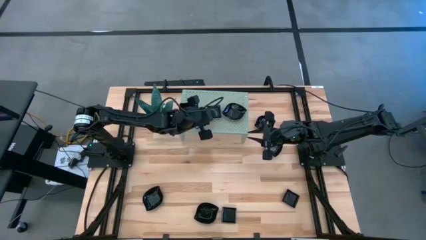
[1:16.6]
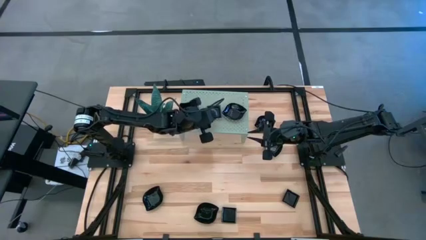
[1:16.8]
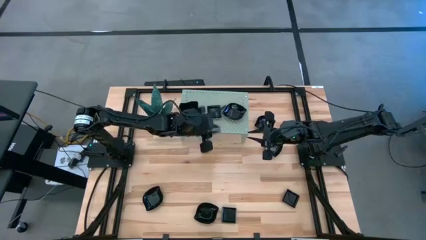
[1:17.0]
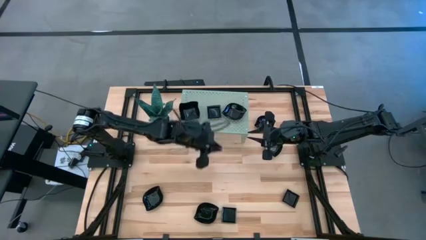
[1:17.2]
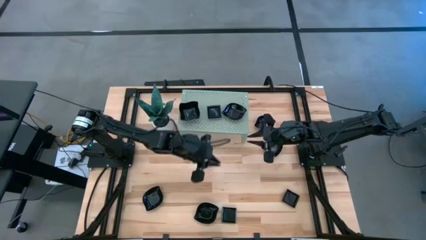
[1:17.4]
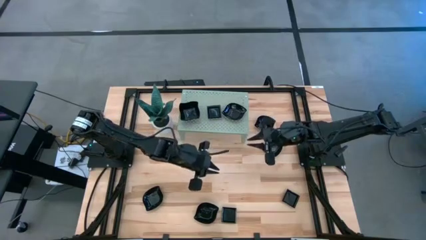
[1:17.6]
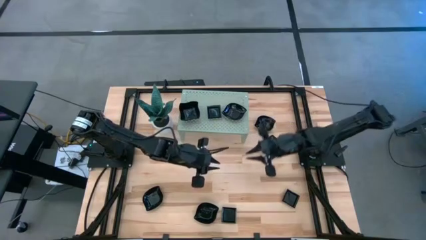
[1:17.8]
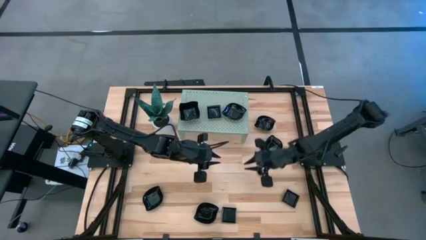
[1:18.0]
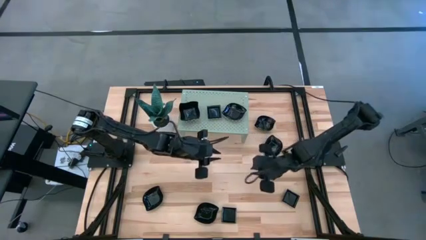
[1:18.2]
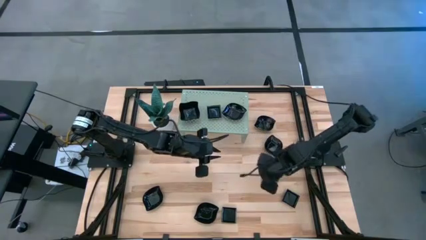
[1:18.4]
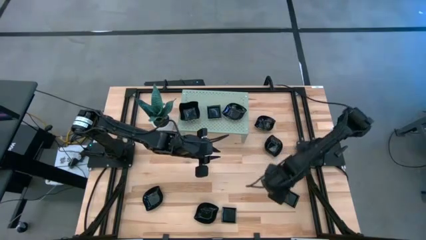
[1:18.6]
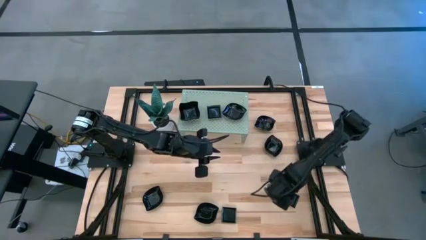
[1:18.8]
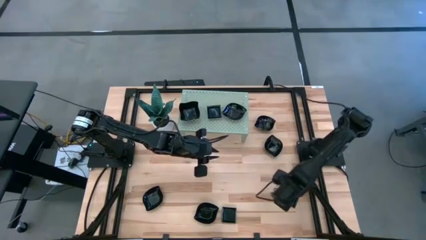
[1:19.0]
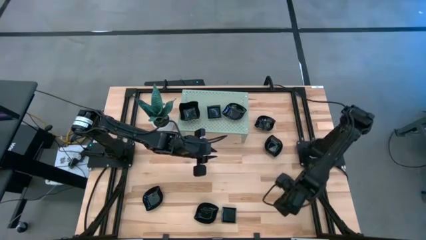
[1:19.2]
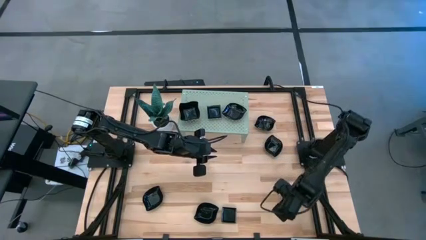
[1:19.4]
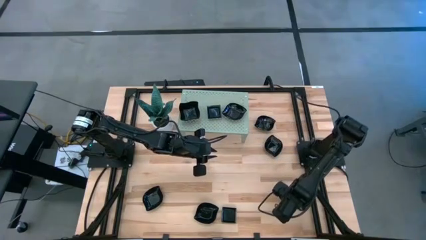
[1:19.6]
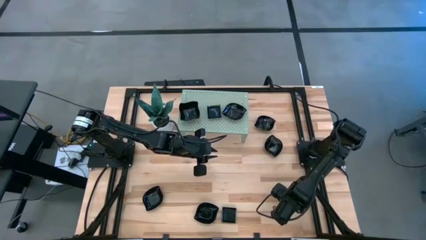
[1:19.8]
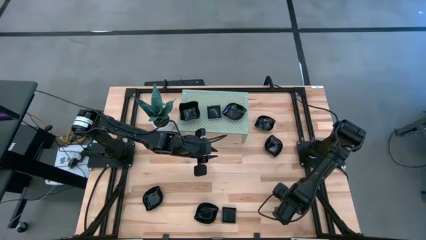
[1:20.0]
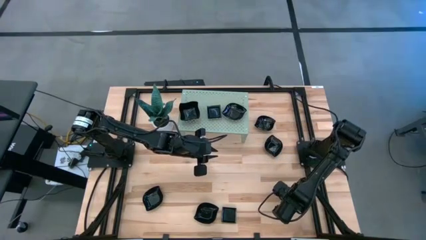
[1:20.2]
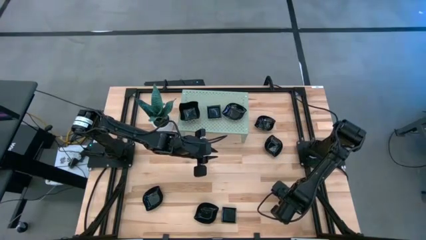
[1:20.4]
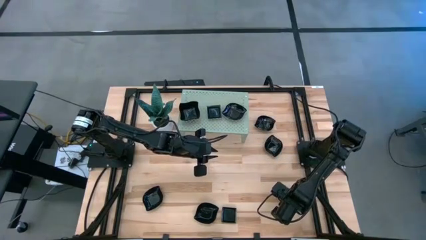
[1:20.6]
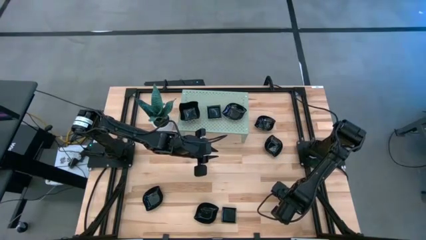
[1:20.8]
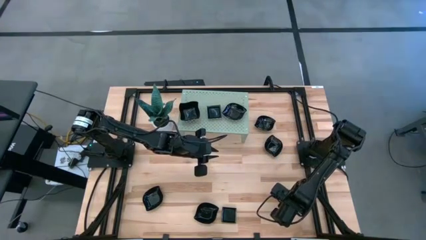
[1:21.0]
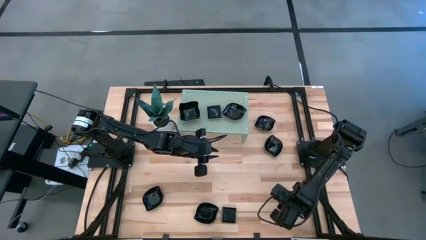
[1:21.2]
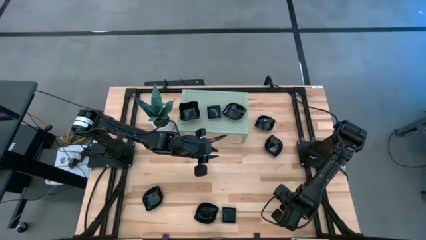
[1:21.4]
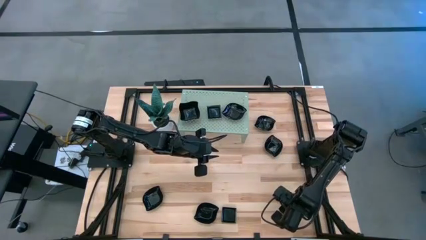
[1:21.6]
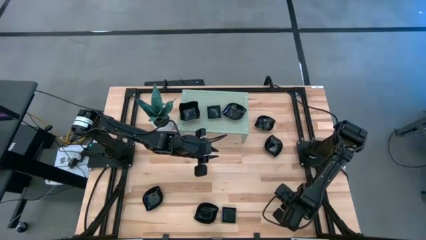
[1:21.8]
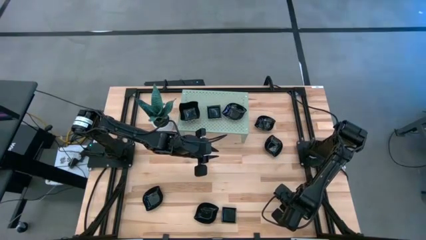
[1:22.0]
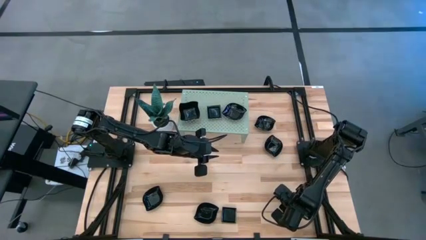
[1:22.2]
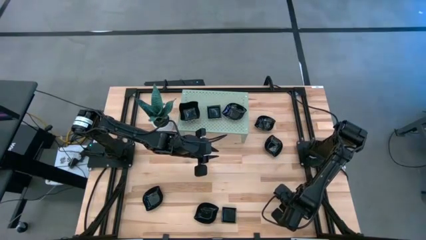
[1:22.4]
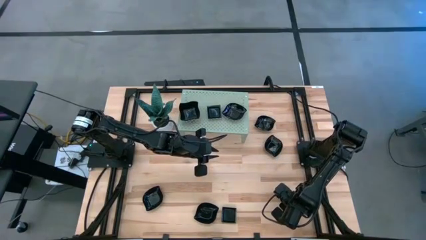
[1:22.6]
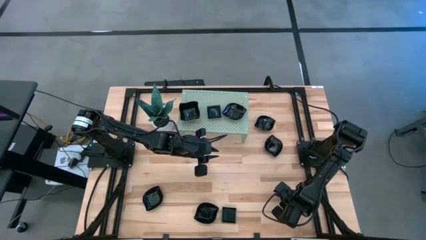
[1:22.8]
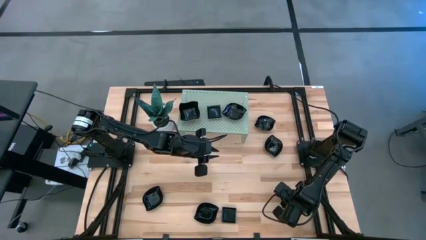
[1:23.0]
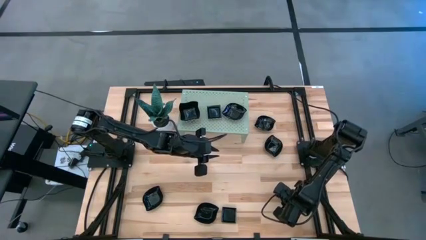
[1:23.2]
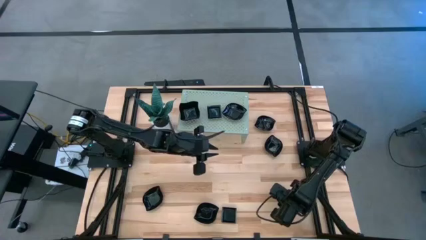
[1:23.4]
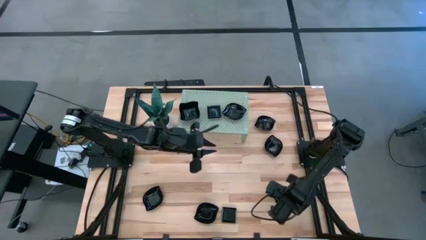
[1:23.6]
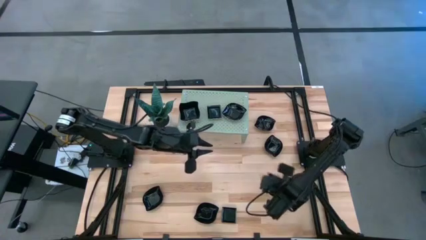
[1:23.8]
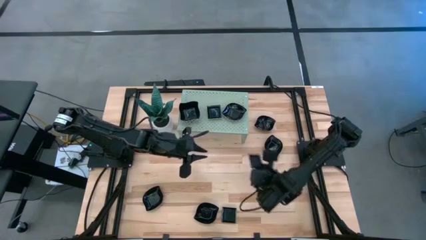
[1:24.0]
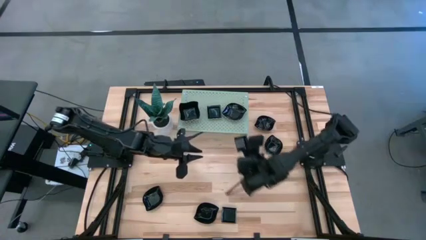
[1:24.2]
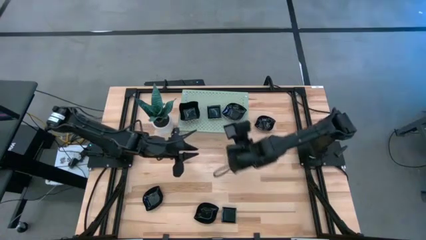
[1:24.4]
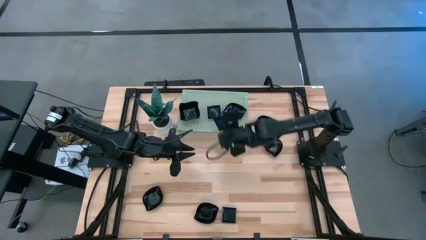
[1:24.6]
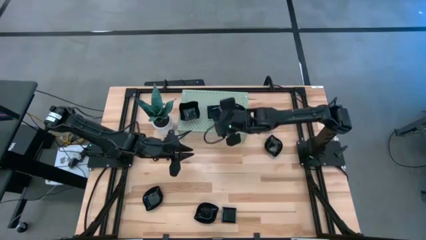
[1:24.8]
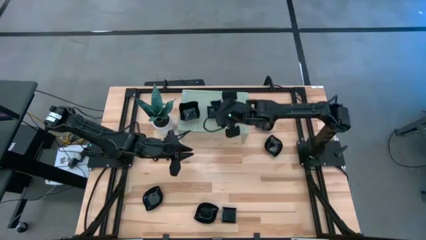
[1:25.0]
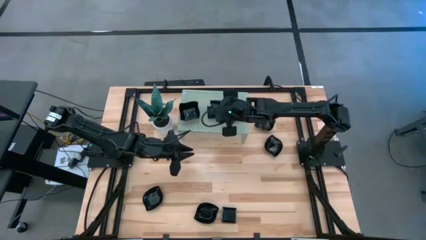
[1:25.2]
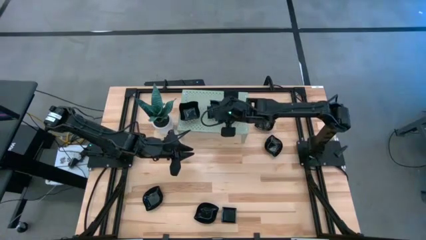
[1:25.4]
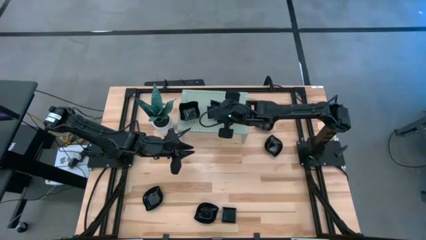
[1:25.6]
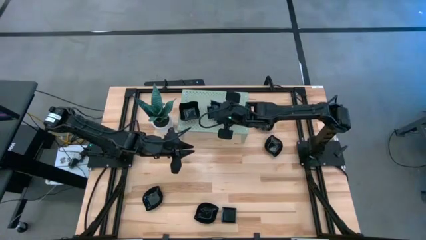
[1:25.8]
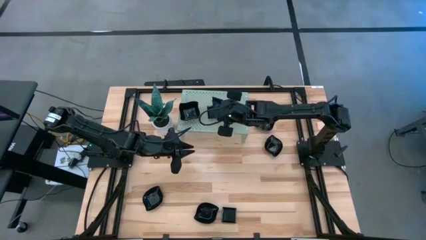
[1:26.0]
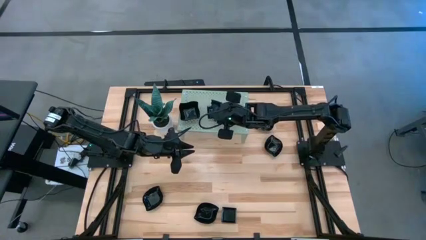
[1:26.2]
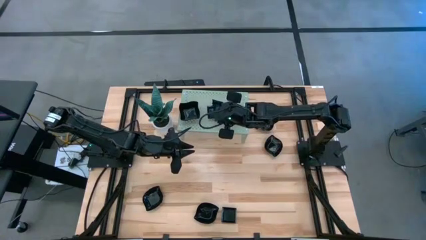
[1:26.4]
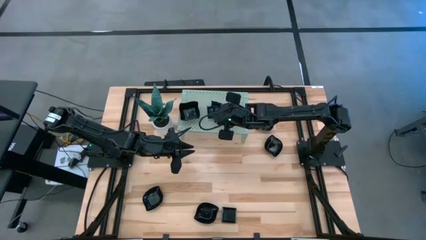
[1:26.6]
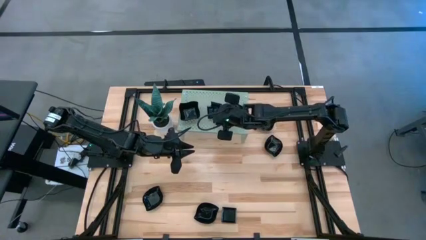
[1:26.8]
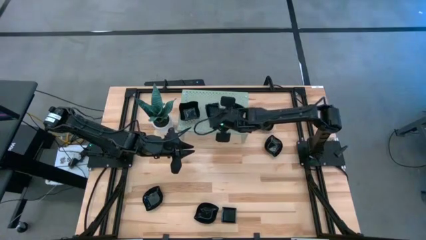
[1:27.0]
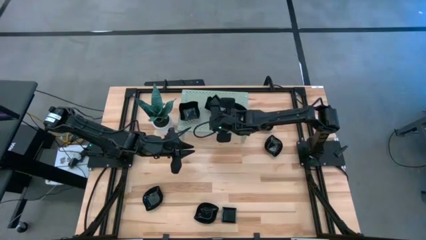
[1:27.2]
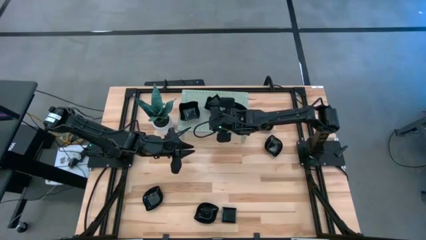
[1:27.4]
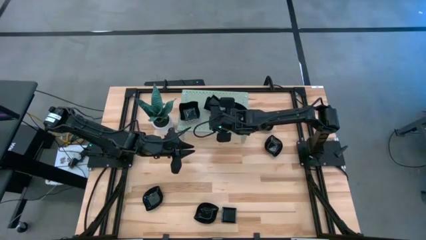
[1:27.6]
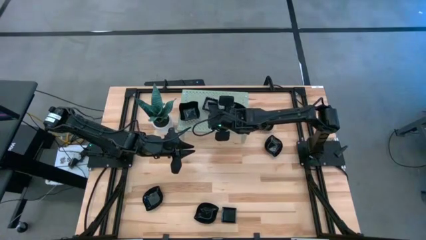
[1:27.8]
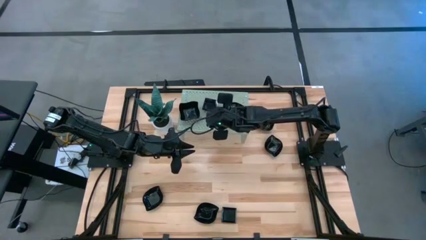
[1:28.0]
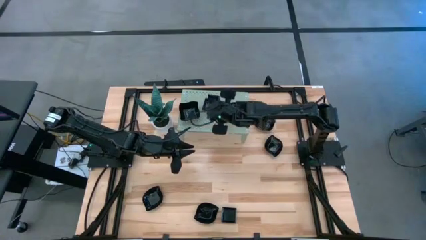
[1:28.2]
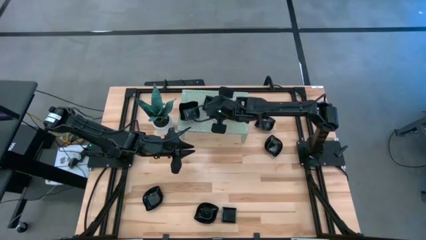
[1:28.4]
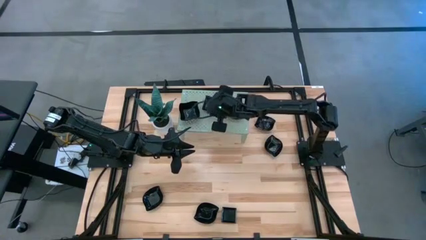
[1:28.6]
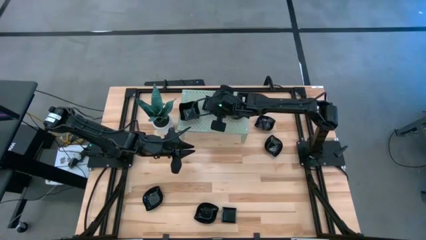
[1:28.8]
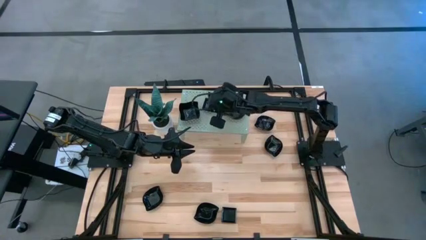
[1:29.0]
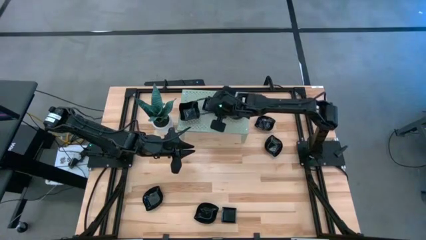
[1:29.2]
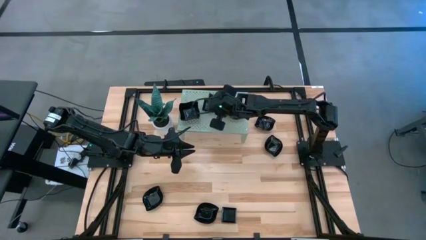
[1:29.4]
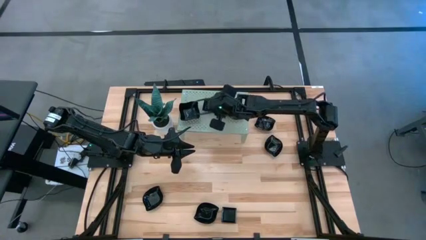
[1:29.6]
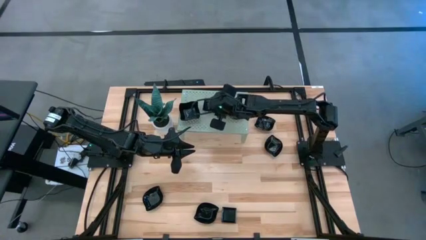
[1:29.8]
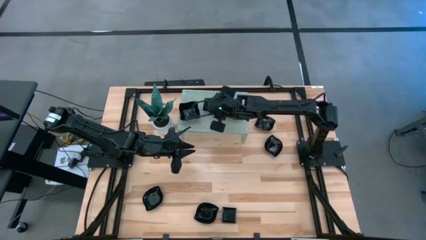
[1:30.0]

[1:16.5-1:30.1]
Task: Pick & Place Mini shaped plates
Stack the square plate on top of the other square plate on the shelf

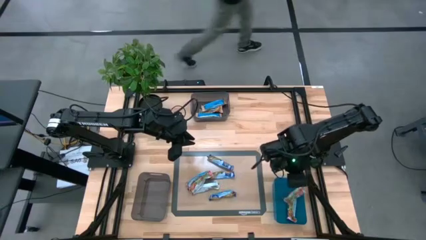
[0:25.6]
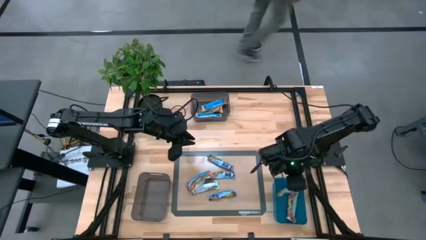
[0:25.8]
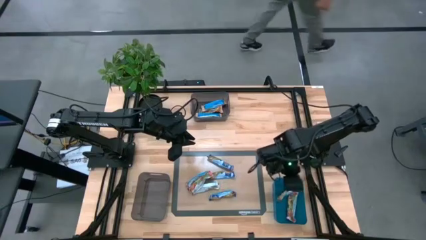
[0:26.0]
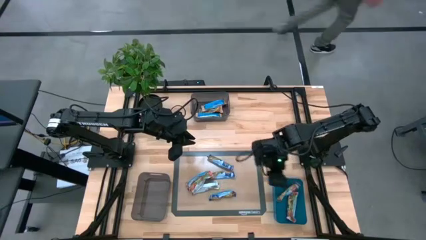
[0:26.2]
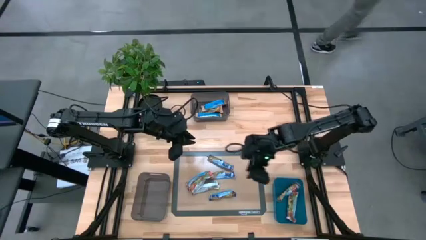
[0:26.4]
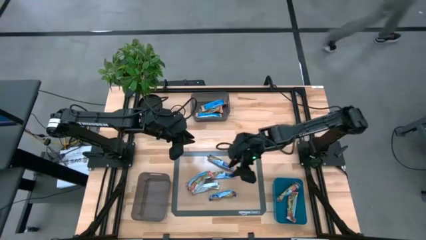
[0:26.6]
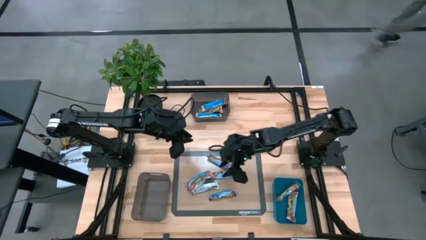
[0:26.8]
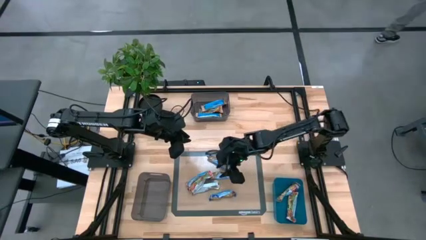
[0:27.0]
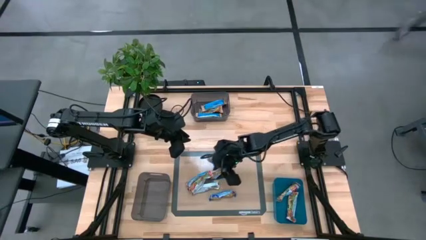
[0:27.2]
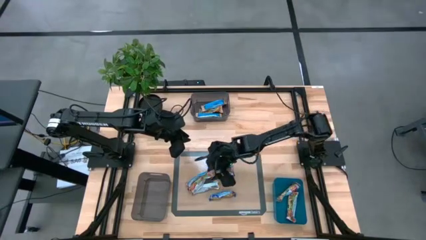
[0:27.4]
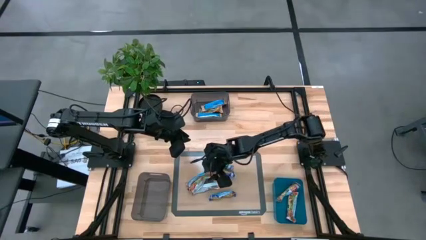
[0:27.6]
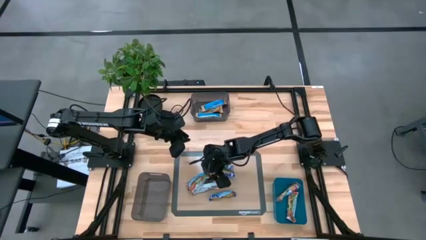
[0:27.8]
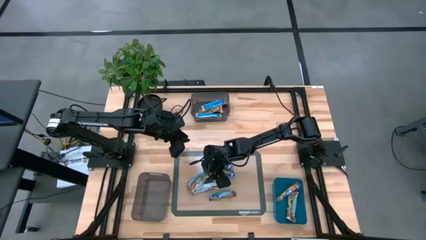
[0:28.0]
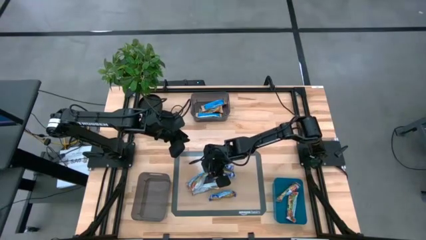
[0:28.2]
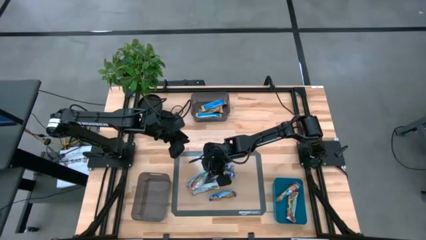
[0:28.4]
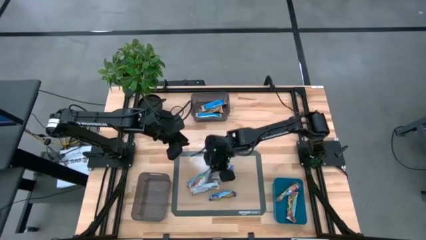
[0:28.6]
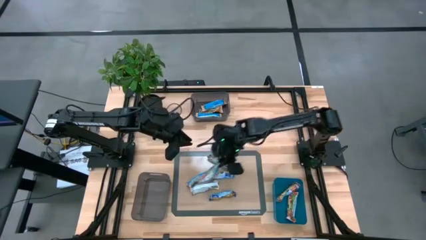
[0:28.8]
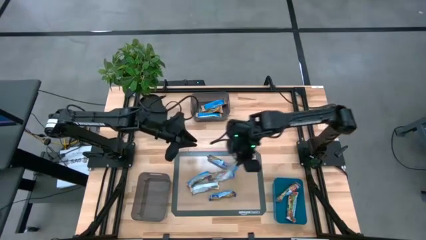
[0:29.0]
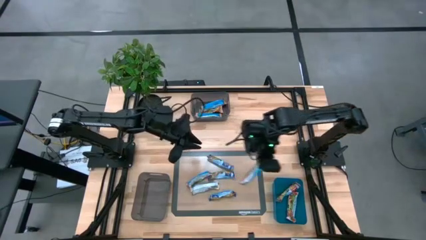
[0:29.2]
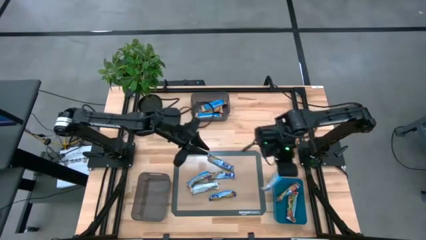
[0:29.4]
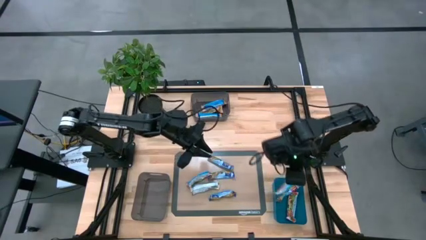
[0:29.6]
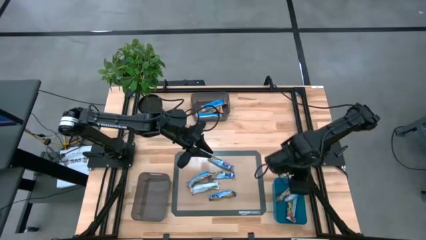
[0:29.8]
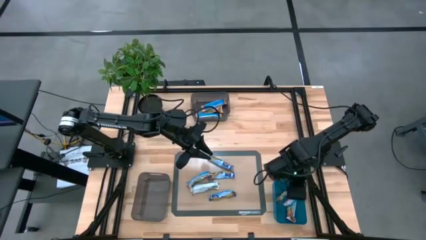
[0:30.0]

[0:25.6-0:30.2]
Task: Pick and place Granola Bars by type
Put the red granola bar into the blue bin
